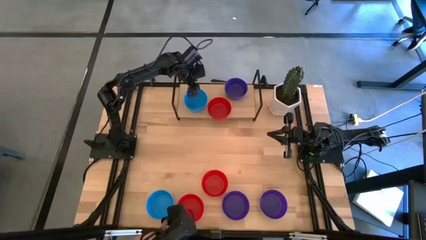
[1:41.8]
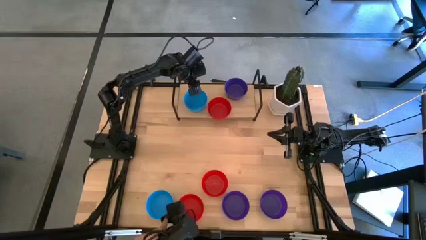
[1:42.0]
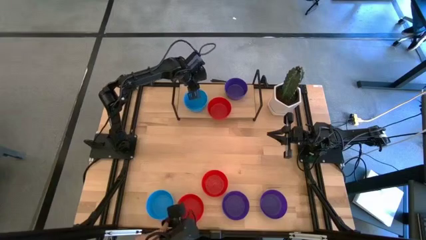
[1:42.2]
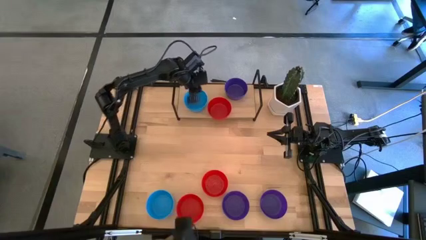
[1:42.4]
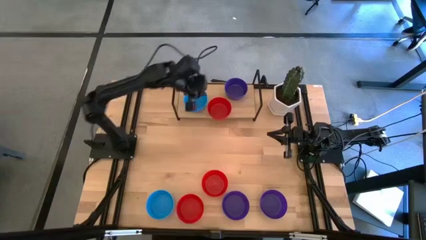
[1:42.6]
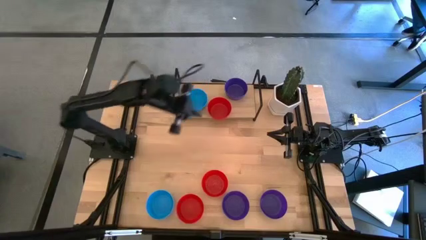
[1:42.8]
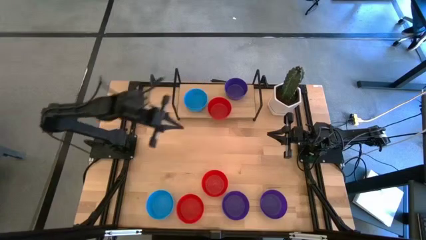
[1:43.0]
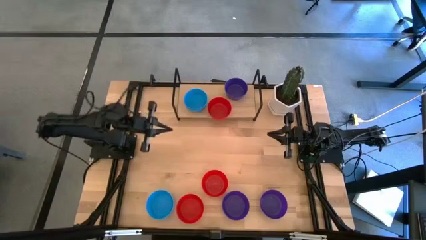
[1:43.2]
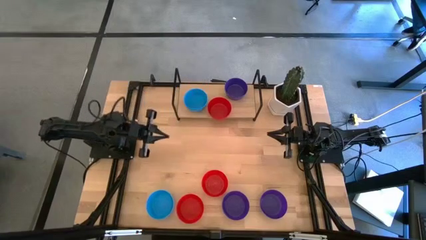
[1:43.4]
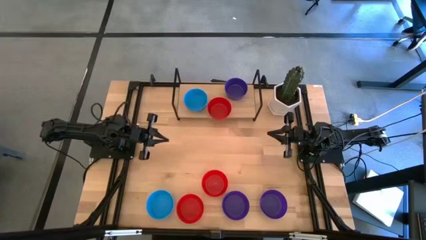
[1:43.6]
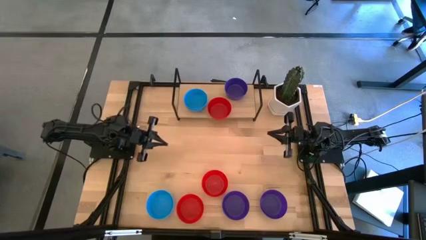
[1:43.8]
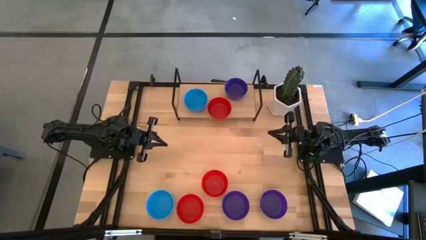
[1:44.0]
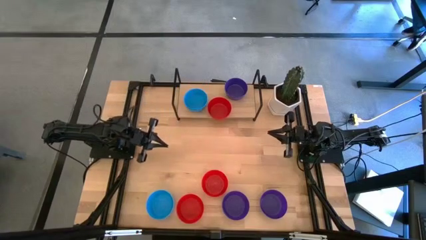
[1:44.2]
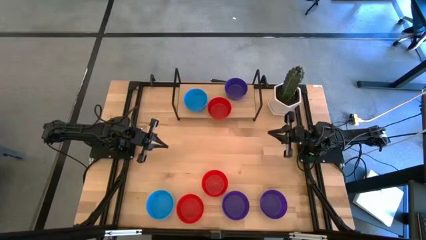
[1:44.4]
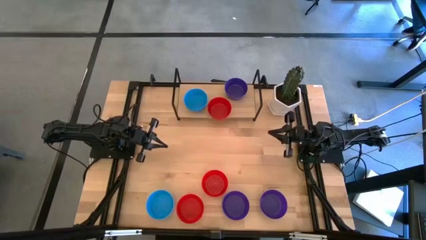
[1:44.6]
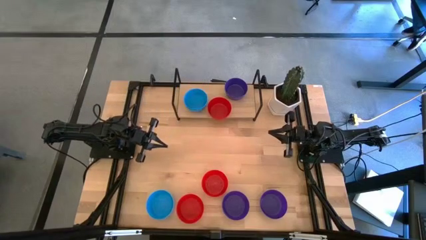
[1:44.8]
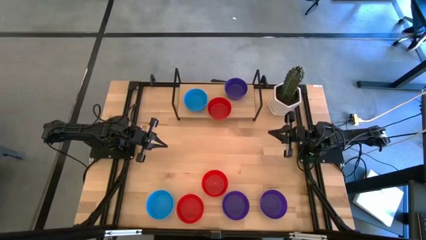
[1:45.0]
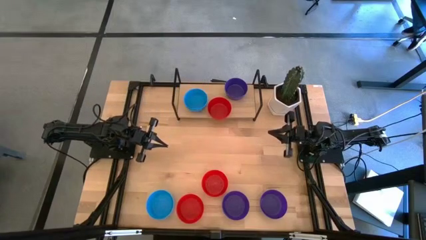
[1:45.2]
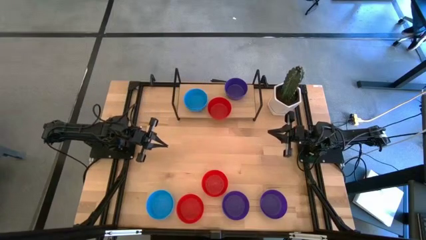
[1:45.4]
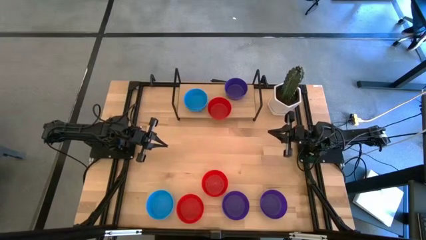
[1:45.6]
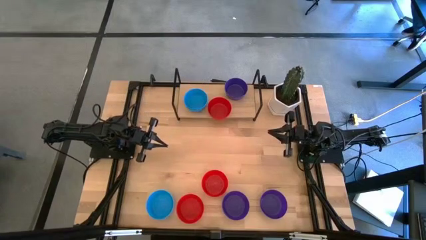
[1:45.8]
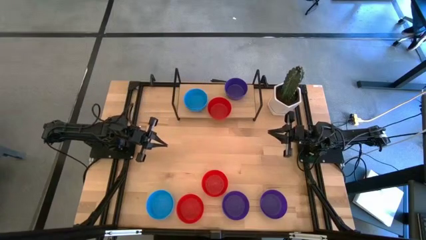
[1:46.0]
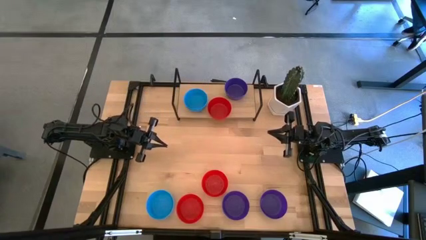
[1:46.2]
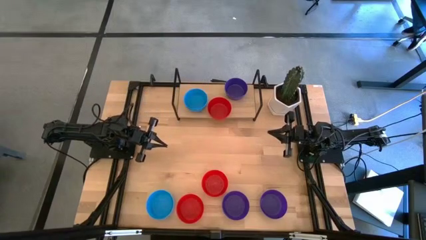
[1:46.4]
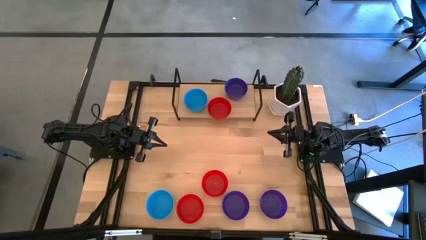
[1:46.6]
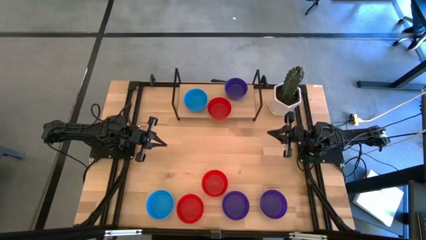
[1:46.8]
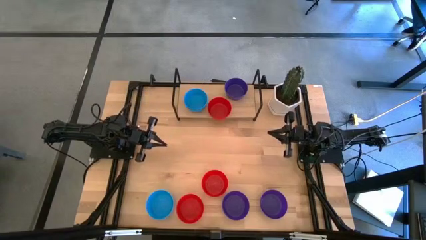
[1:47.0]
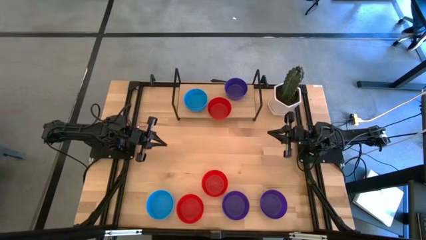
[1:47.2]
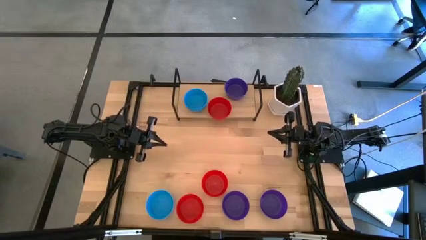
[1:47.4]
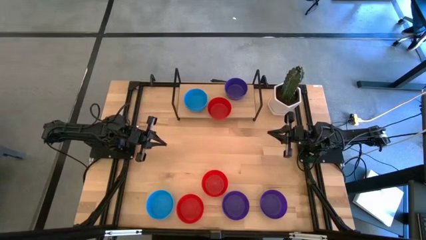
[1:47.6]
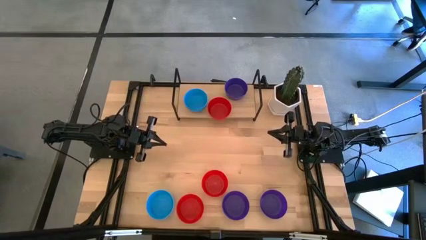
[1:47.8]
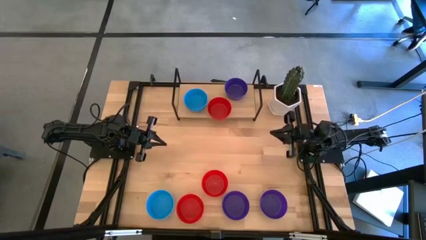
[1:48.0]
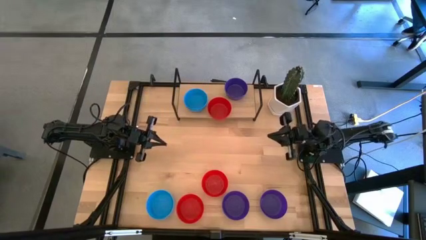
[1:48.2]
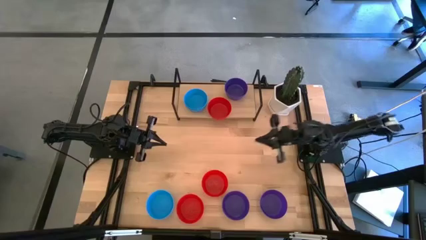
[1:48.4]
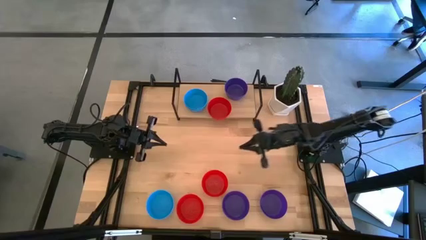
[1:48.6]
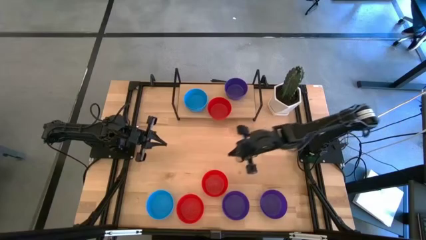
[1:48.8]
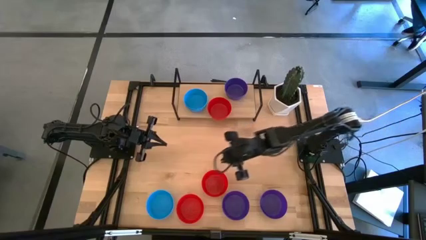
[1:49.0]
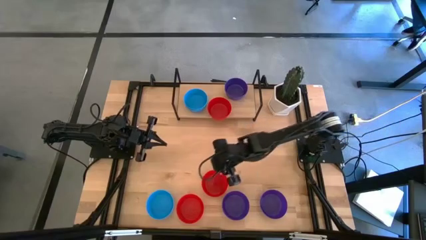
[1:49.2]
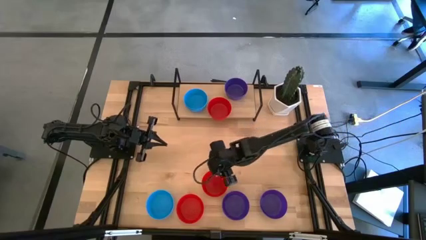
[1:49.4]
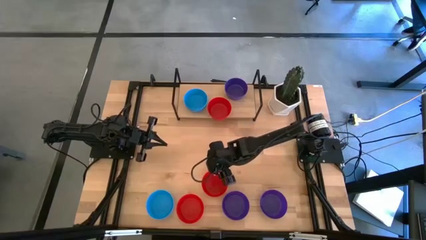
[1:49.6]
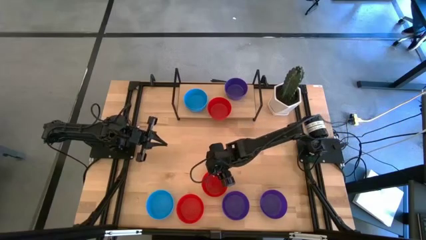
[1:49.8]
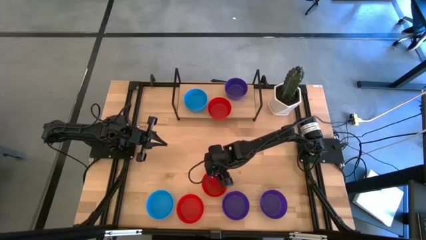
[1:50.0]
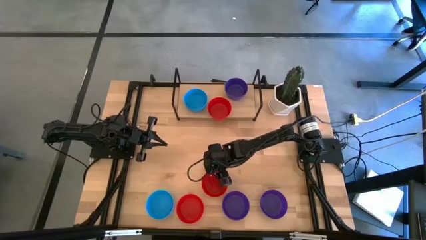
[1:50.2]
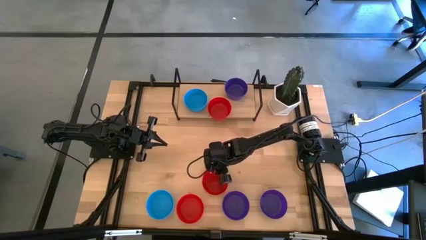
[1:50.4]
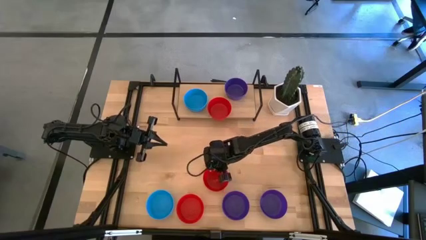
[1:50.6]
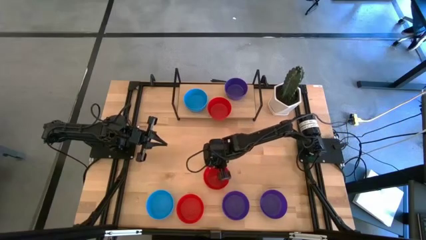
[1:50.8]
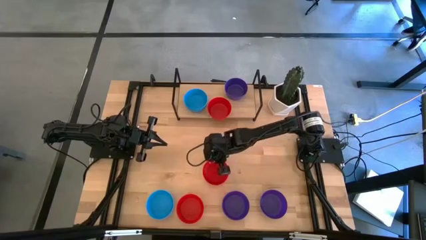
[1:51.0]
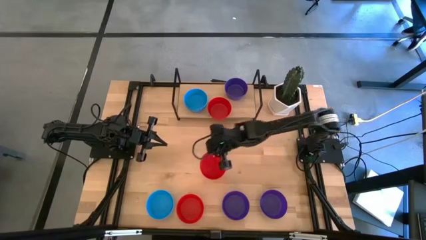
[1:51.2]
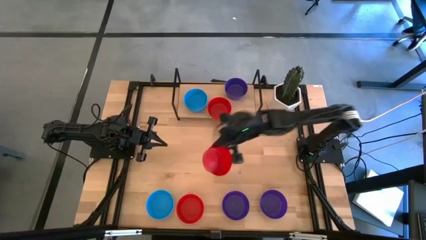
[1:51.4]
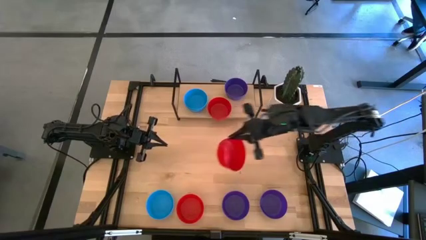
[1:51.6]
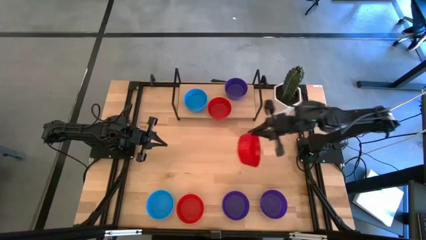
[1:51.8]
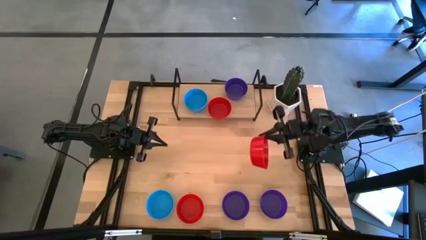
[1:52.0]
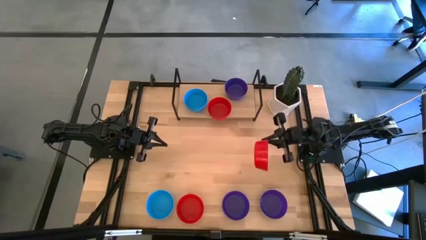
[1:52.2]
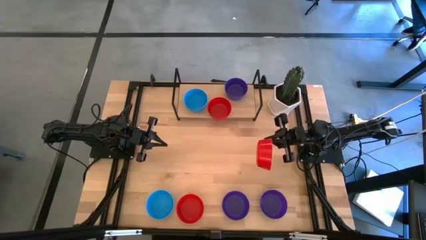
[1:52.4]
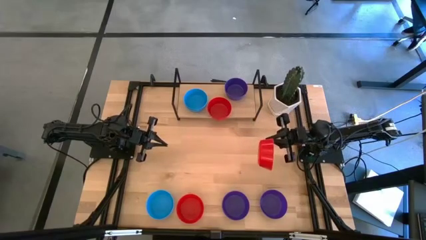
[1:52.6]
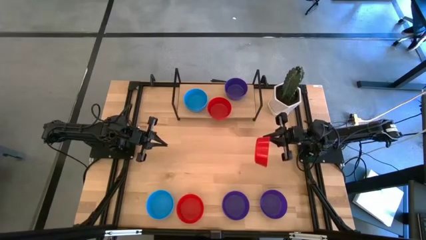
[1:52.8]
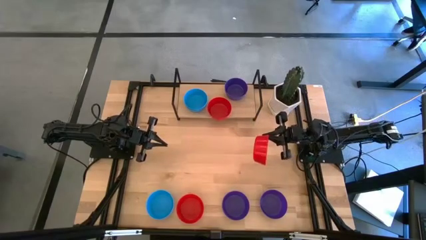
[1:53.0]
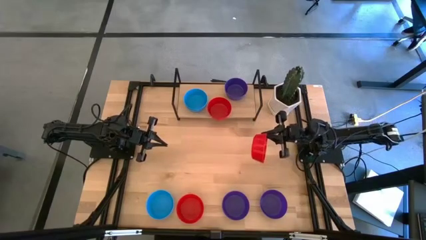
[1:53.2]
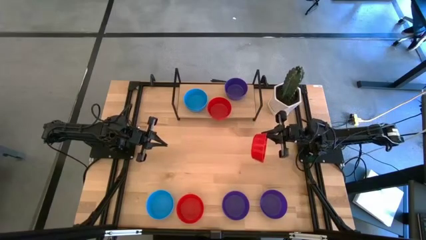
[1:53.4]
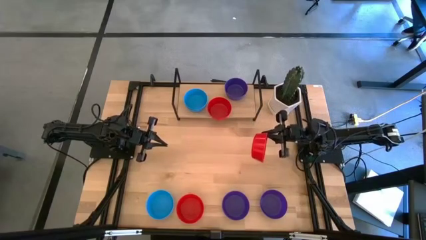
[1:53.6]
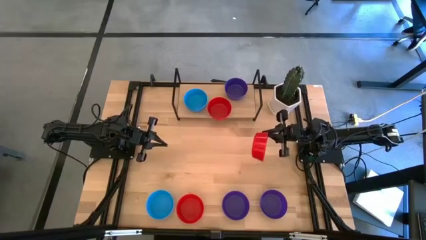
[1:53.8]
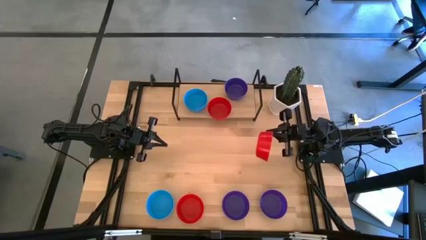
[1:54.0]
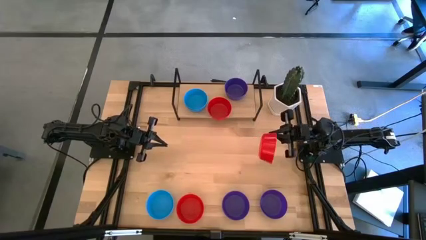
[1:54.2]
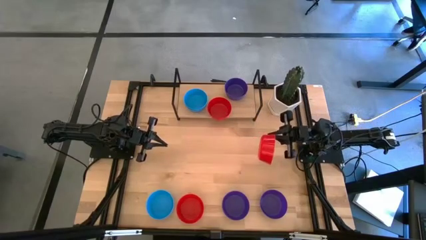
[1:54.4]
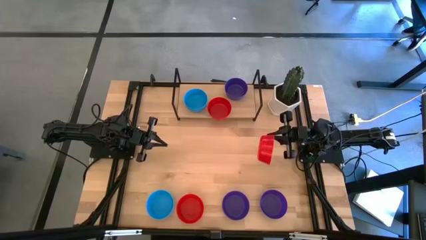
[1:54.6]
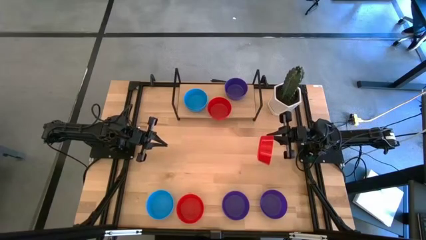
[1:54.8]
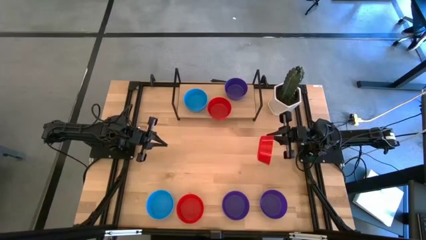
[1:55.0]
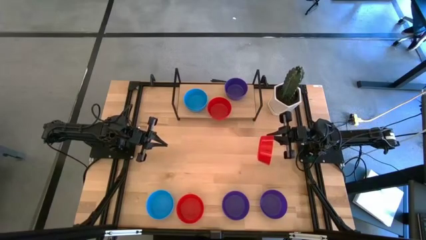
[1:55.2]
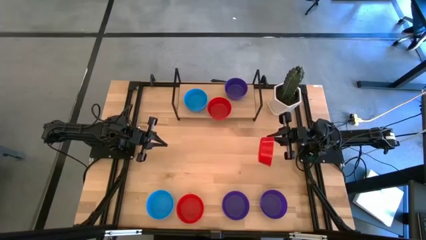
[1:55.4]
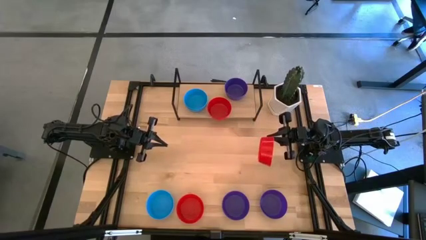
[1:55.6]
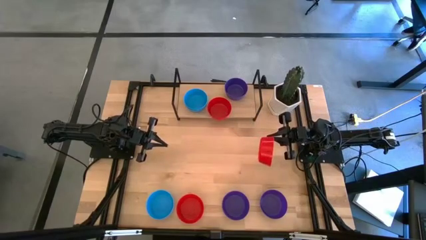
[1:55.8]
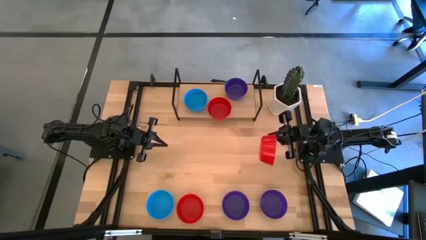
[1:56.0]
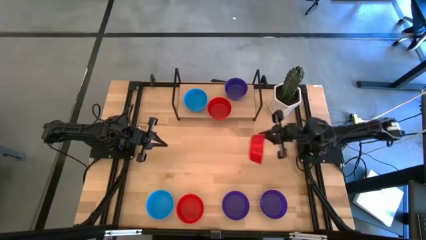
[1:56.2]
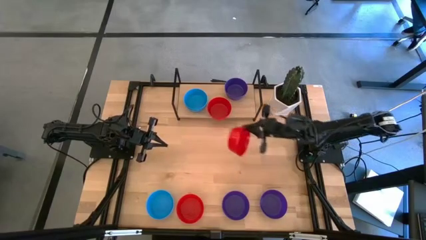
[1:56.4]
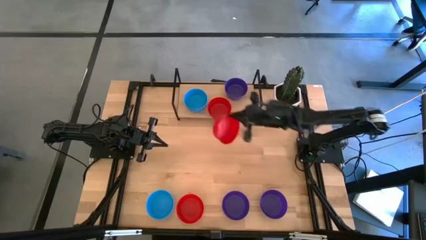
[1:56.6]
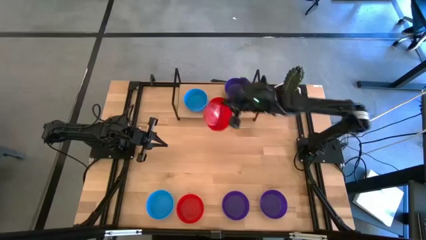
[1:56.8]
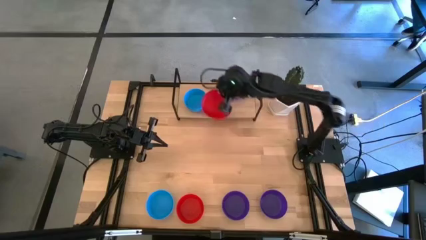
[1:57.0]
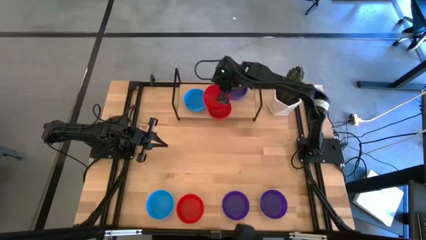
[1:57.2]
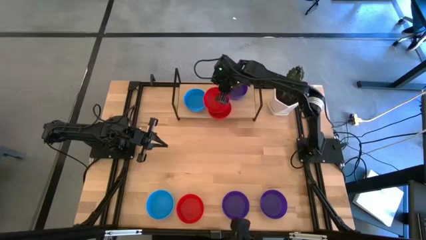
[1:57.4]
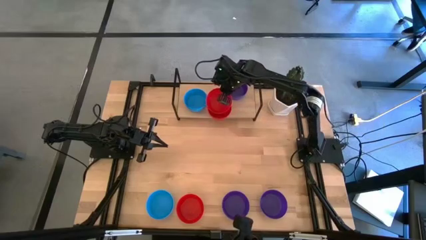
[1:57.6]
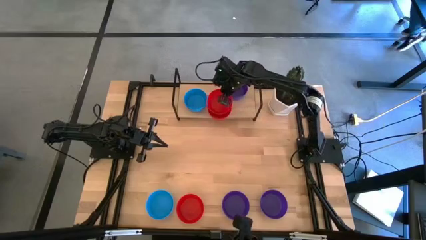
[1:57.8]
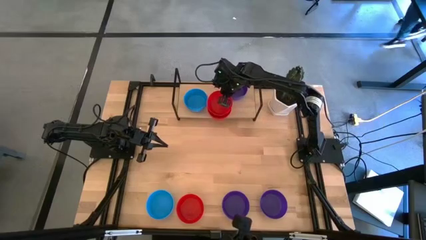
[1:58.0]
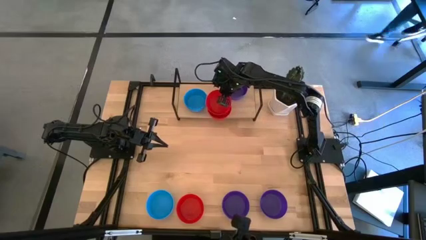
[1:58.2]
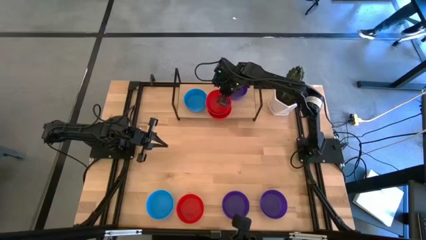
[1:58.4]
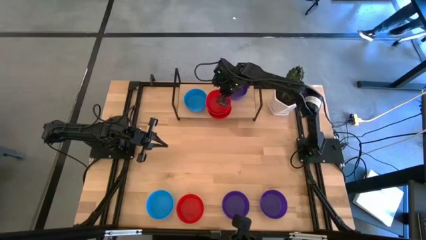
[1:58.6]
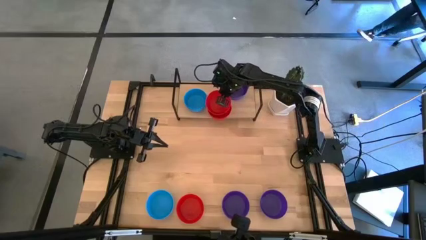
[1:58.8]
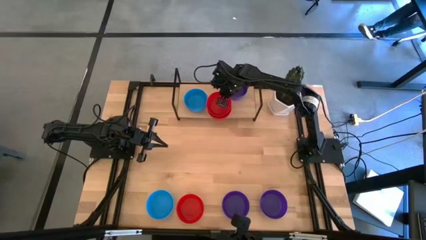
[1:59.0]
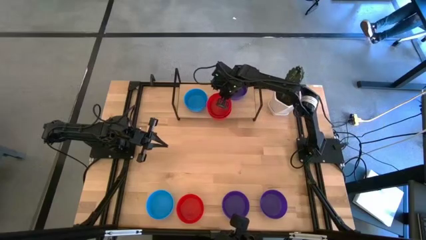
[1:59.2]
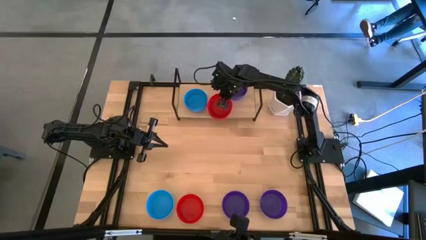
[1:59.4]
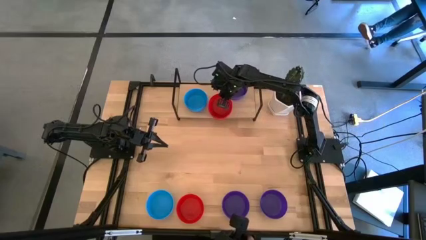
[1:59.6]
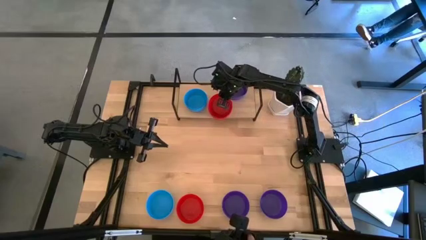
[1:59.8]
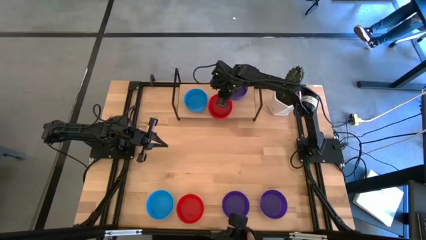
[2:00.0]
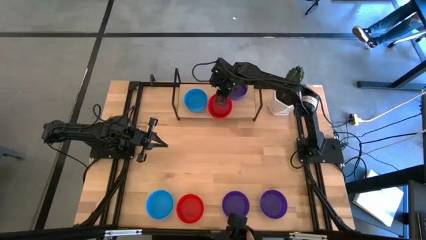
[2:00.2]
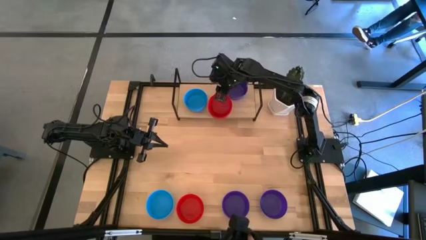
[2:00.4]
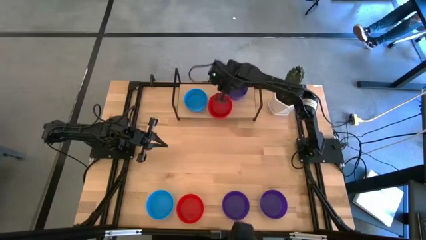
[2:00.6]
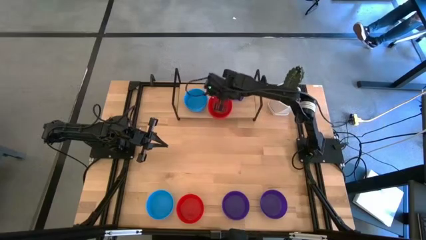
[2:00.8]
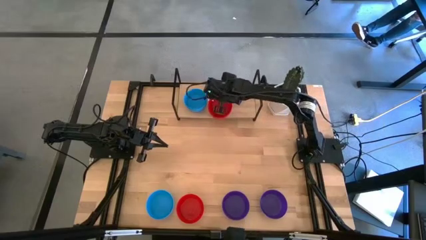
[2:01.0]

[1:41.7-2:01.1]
Task: Pick & Place Mini bowls
Stack the red bowl on the red bowl on the shelf
